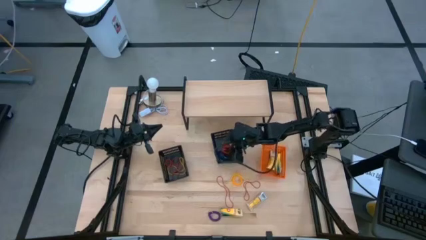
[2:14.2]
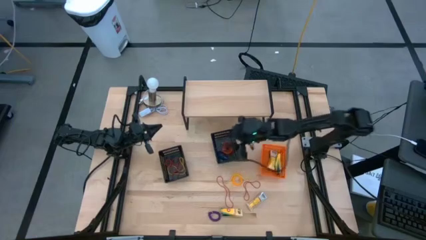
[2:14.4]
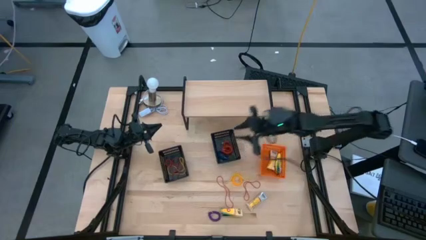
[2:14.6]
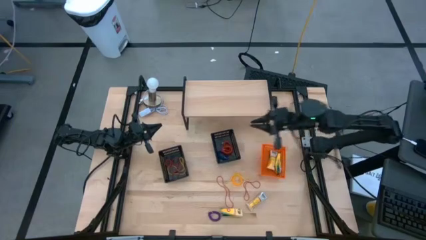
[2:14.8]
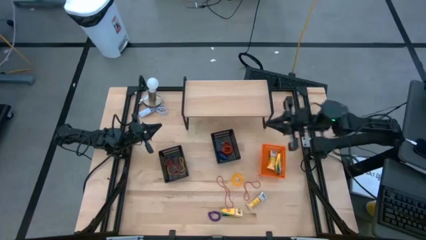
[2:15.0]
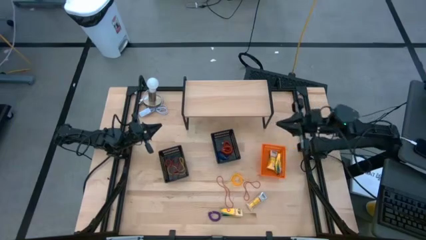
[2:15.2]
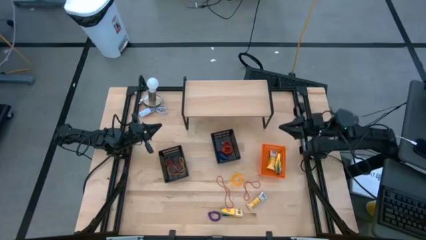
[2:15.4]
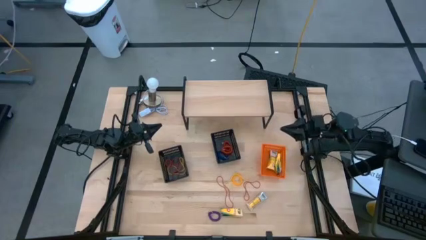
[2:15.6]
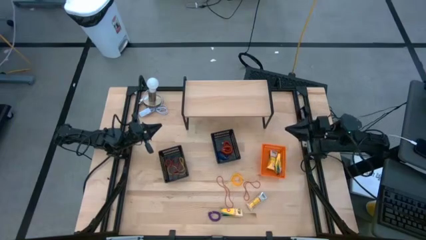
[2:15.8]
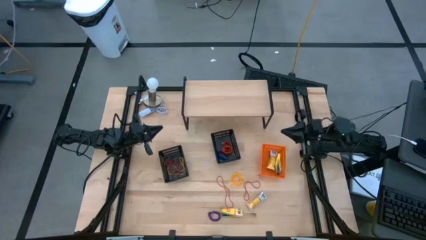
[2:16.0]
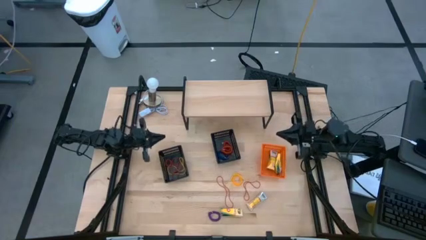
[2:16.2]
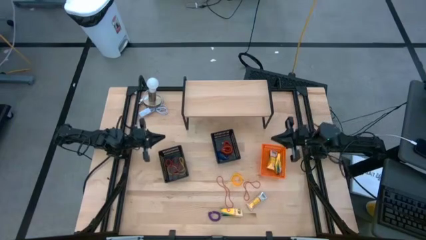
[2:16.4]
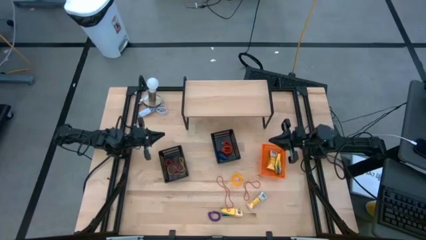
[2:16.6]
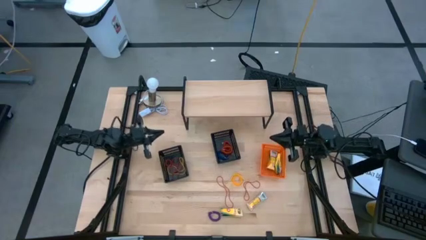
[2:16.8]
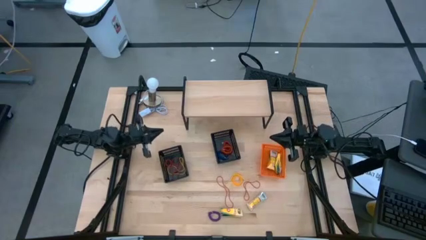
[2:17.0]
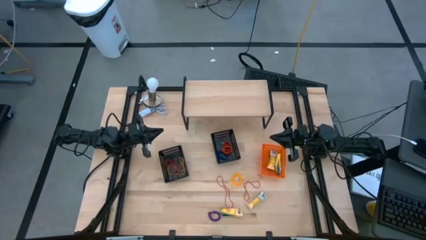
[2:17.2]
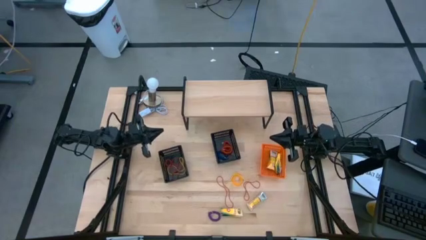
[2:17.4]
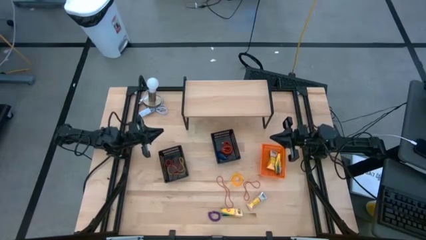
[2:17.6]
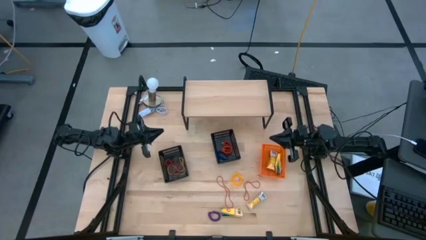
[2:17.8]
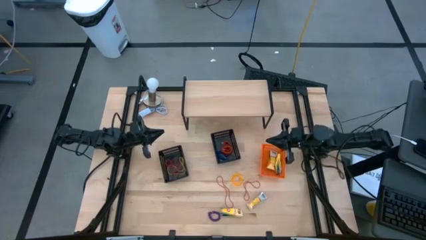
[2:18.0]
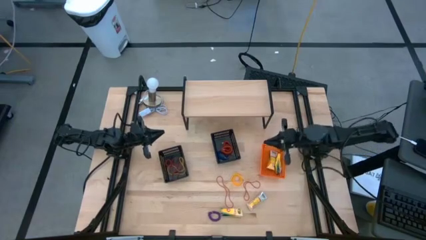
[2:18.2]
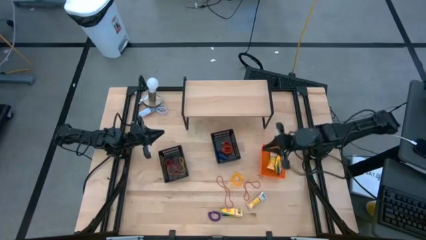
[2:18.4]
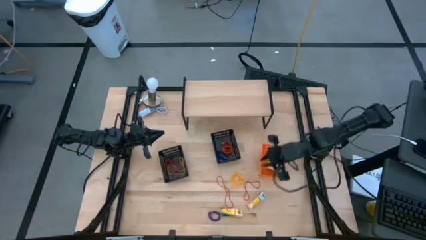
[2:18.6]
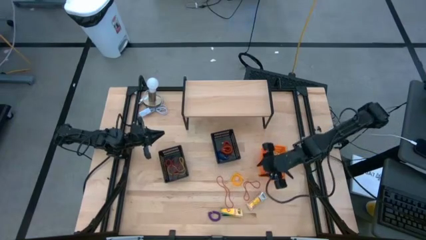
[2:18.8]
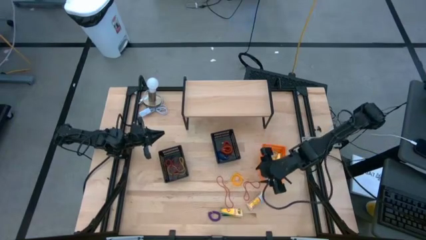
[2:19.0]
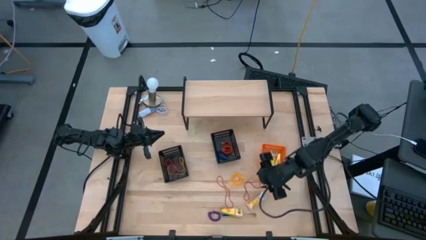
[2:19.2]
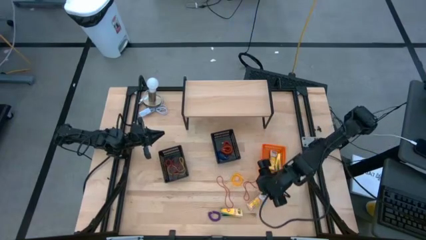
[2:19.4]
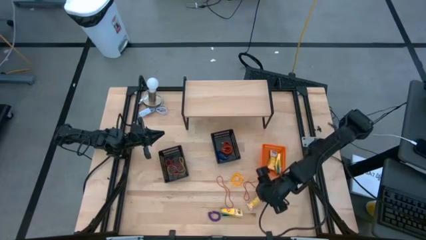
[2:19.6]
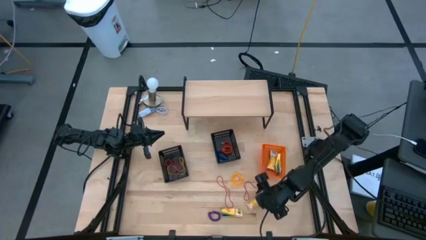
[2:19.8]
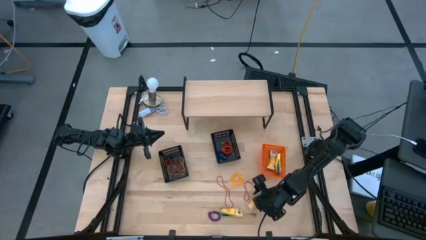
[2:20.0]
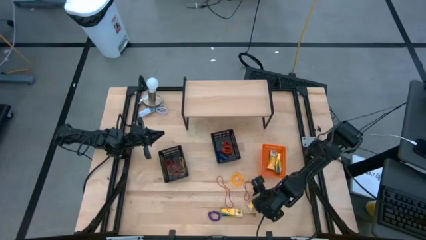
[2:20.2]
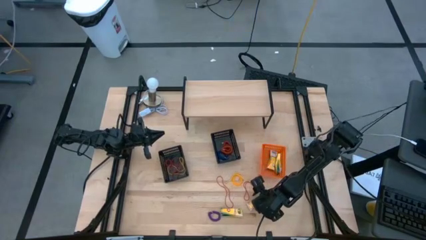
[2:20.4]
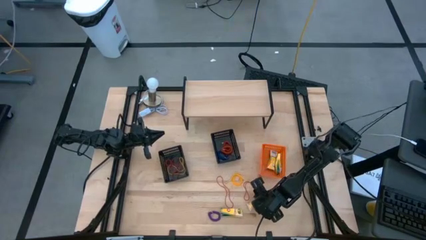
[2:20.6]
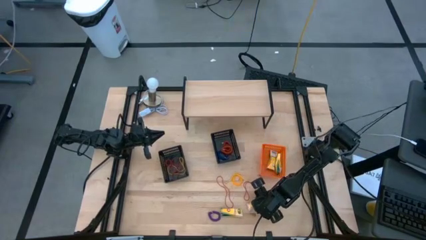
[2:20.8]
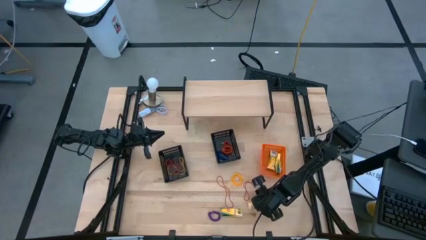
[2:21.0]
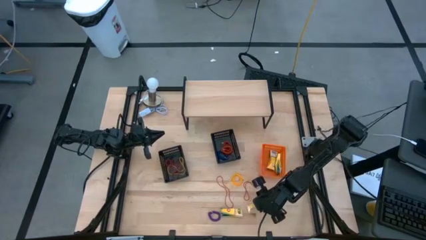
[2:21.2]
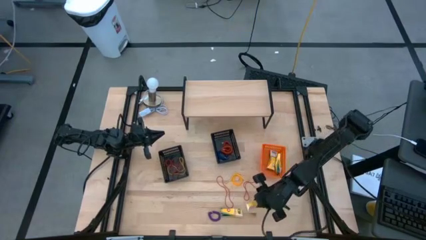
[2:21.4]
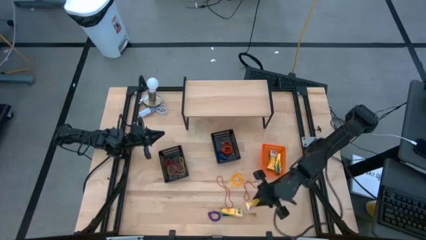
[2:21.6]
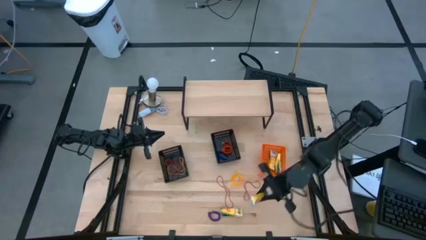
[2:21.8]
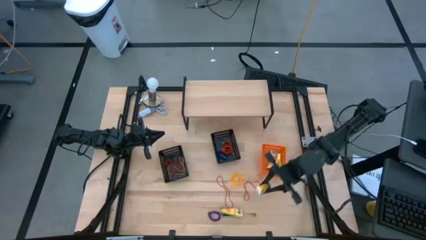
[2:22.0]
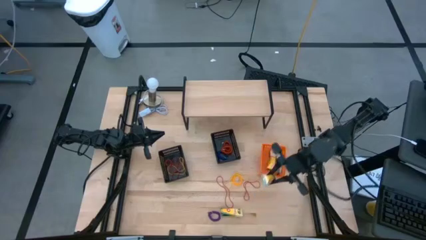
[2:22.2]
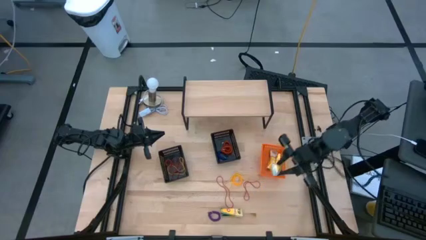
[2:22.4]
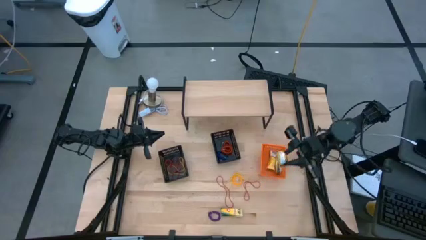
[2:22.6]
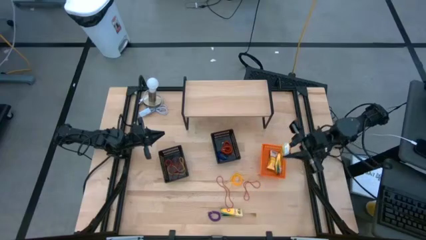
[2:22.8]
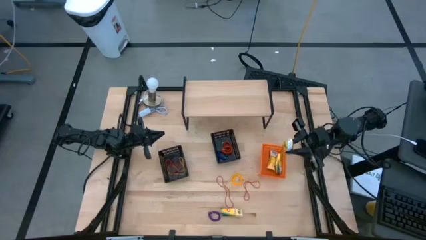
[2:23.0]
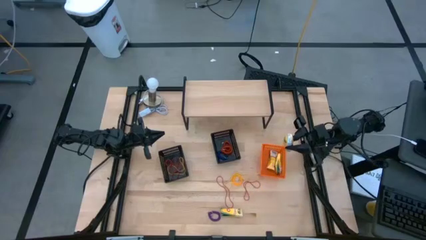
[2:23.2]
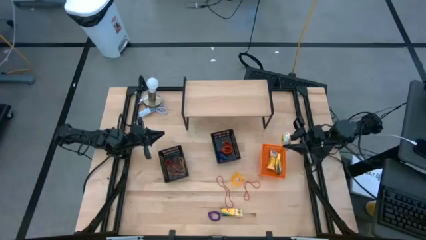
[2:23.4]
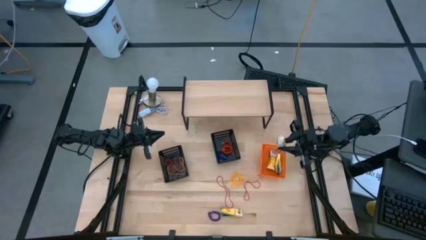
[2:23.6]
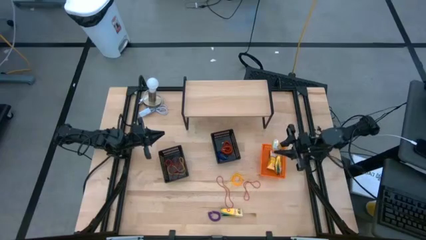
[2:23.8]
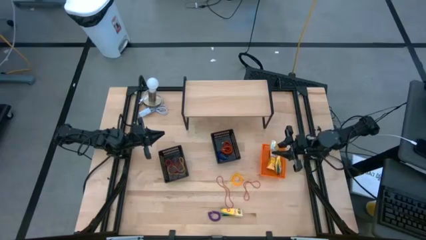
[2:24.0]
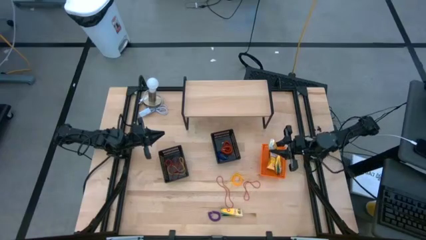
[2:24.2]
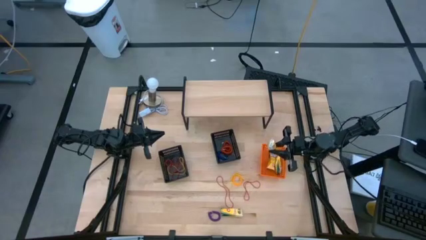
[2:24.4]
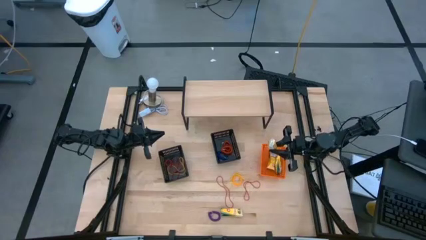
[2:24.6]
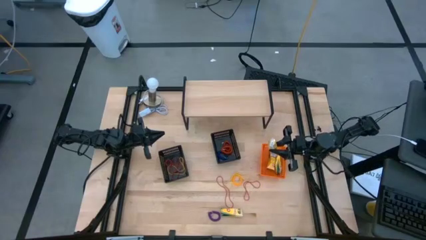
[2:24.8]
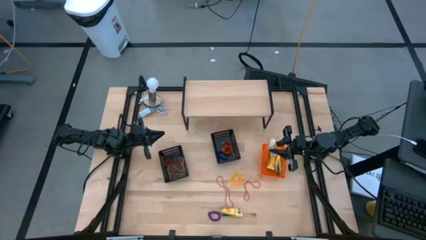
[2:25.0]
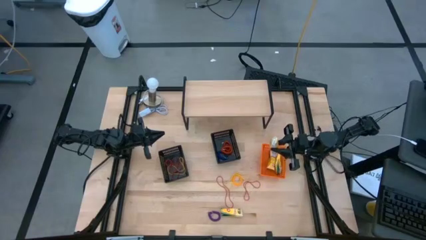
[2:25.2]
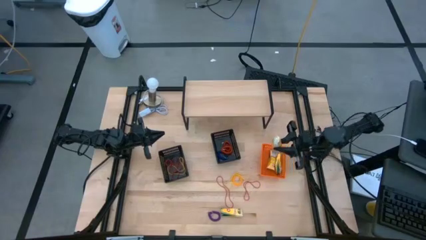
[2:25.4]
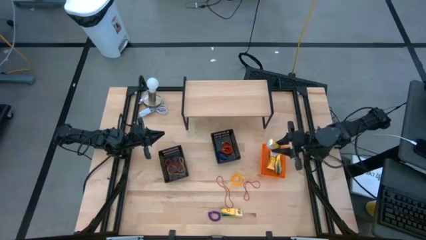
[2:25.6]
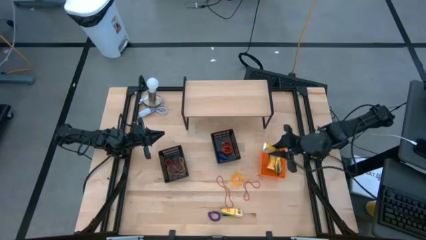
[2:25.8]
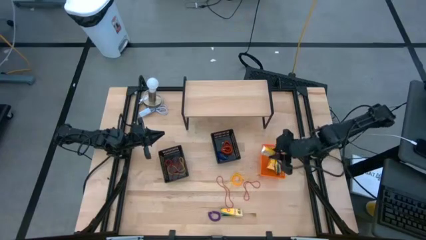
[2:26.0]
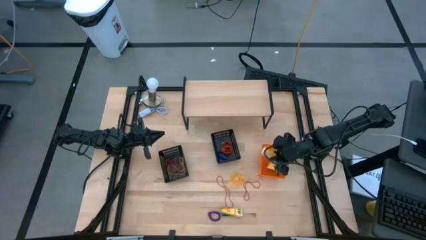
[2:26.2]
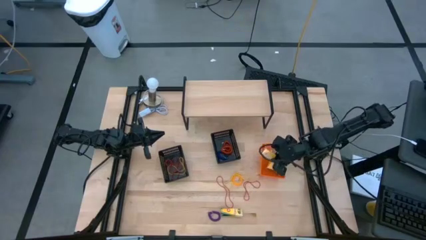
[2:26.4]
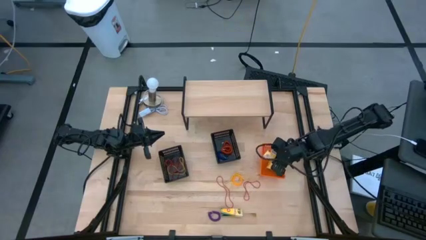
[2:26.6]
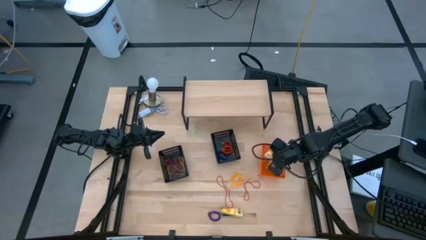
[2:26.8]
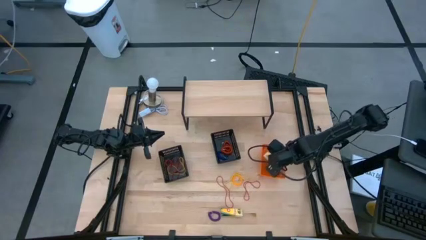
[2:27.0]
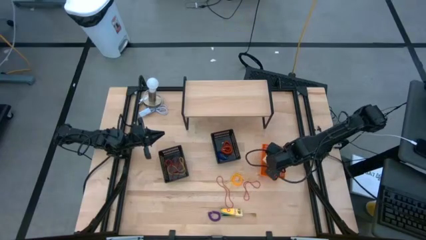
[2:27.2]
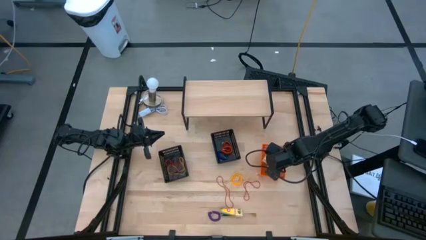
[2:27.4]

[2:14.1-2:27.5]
Task: Pick & Place Office Desk Supplies
Put the crayon box into the orange bin
